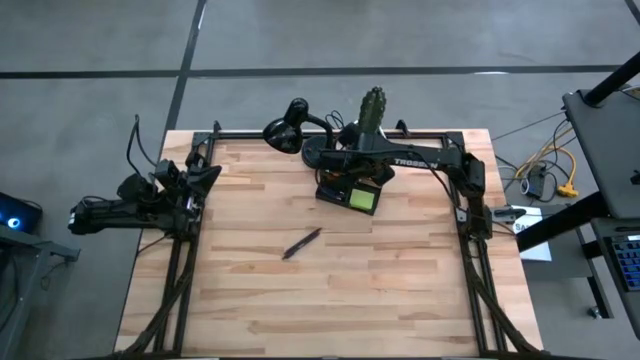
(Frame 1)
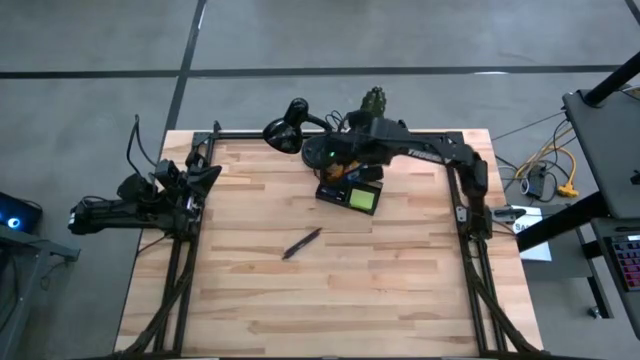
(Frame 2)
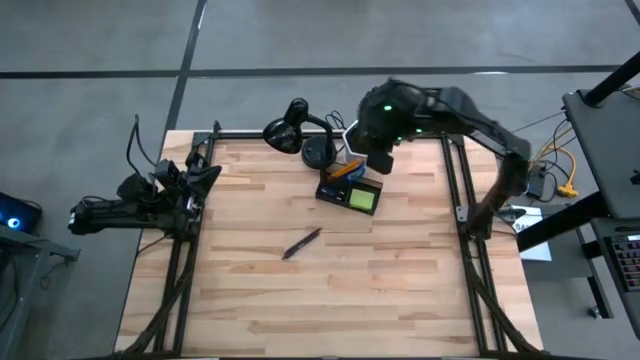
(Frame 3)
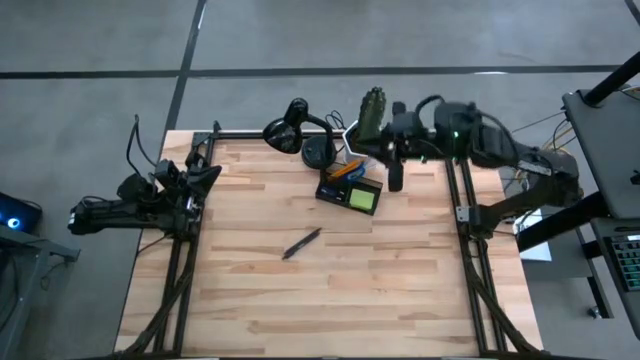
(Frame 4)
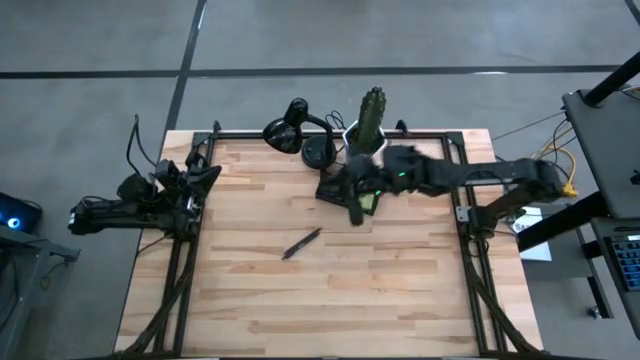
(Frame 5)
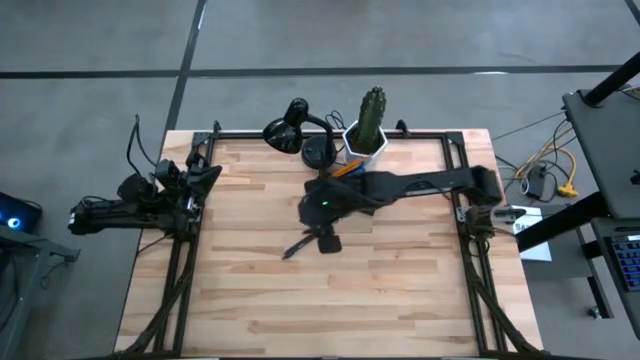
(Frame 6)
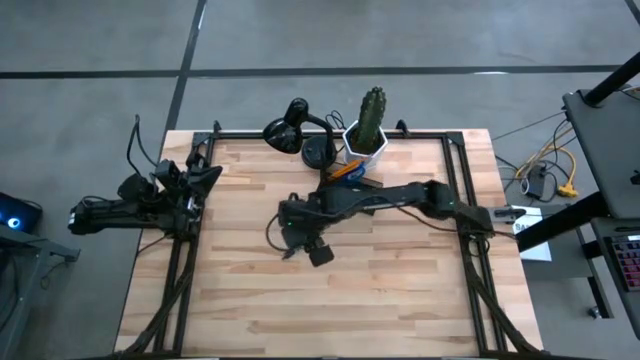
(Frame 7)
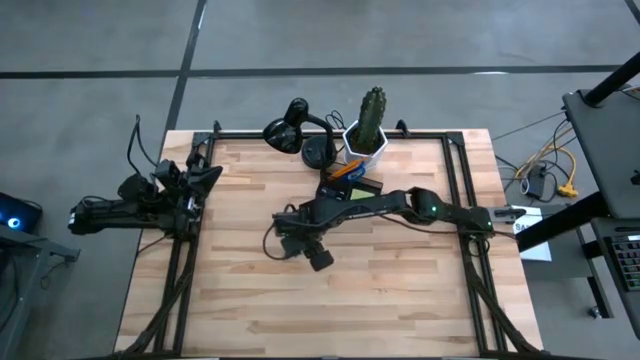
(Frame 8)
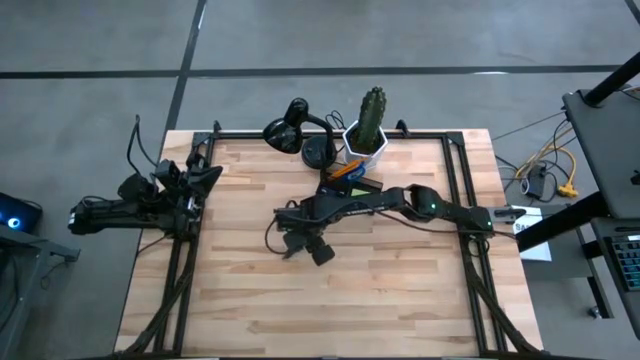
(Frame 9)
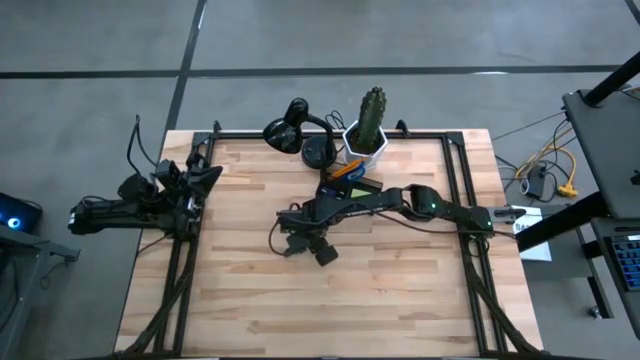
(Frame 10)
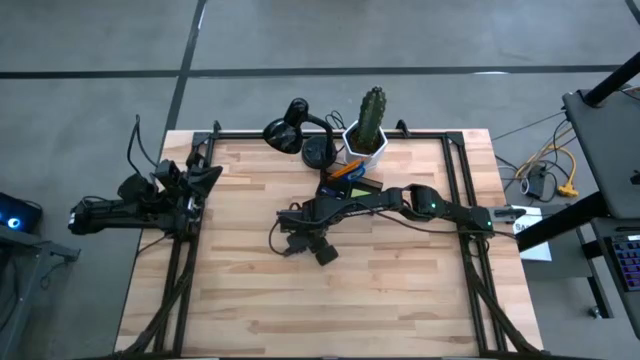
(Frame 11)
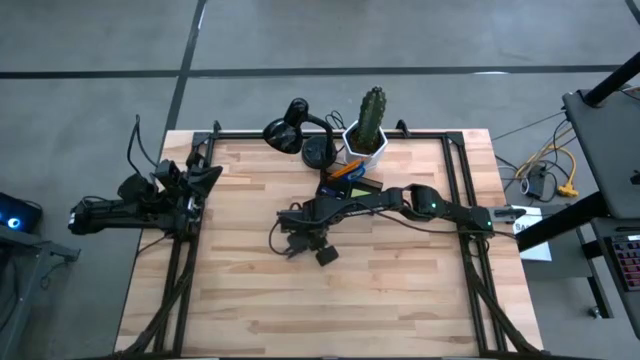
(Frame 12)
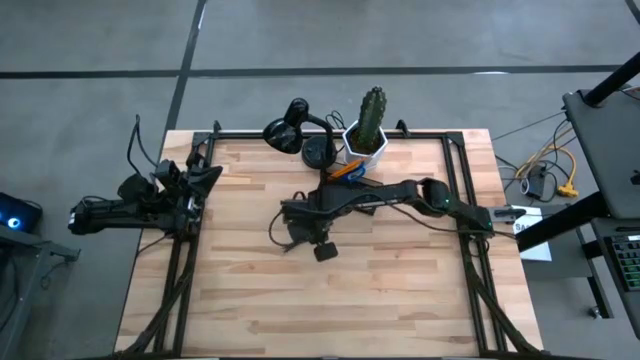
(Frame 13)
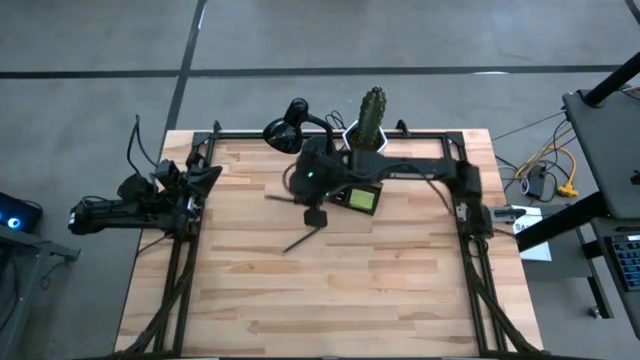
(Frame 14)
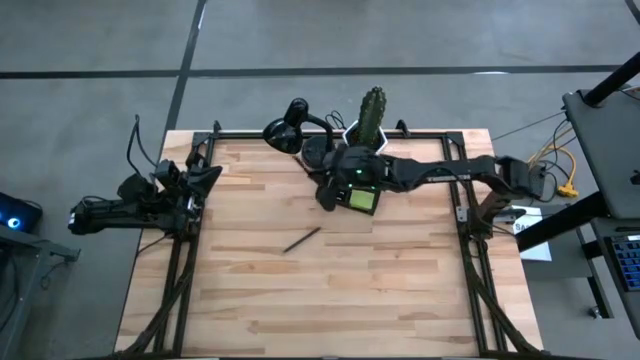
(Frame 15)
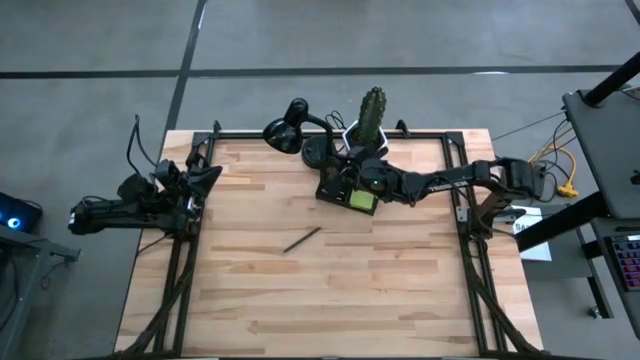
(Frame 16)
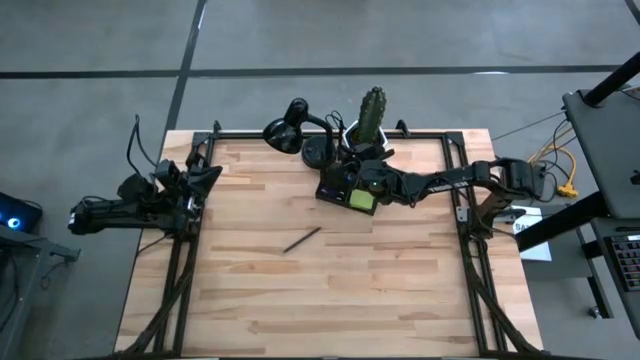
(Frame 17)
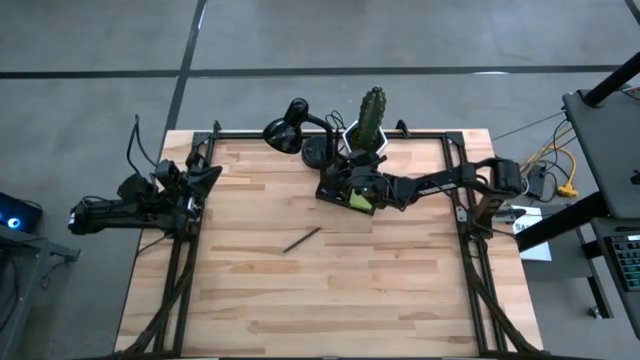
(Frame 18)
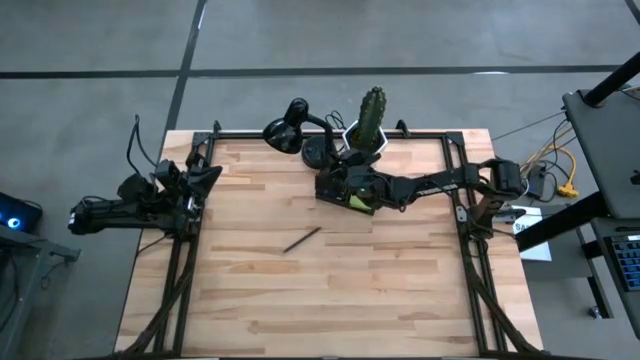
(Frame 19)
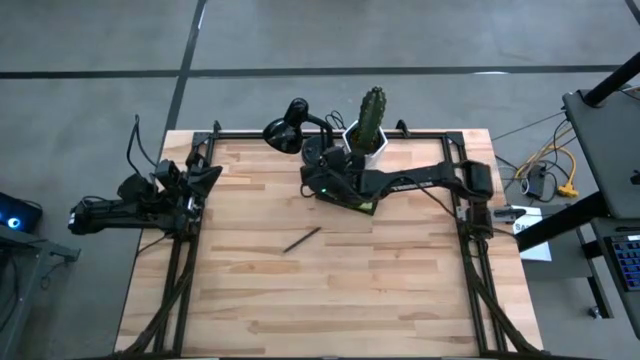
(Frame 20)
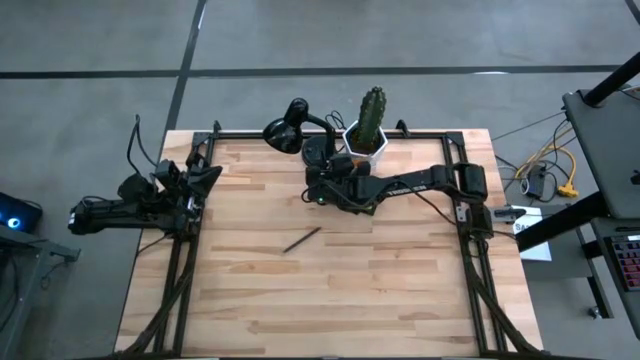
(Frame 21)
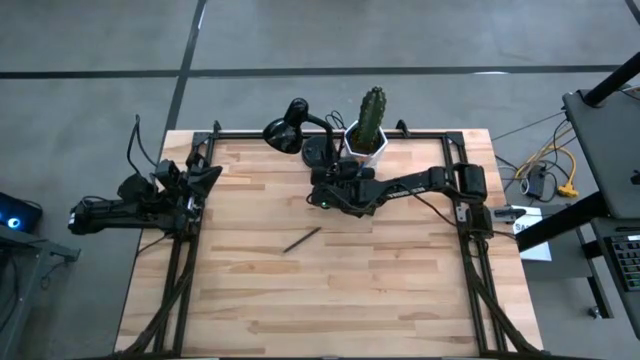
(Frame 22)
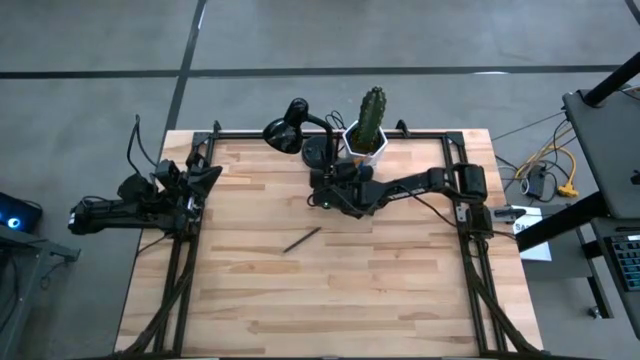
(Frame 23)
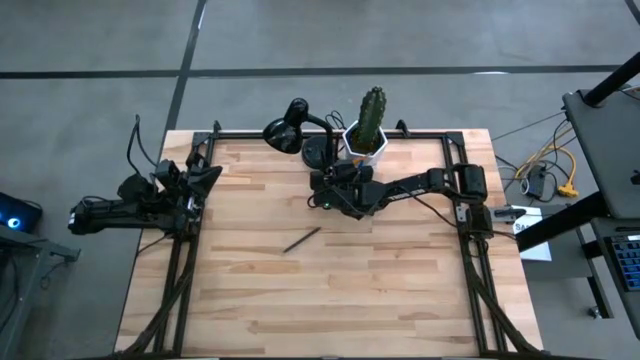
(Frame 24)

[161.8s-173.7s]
Task: Pick and place office supplies into organizer
Put the bottom black pen into the black desk organizer

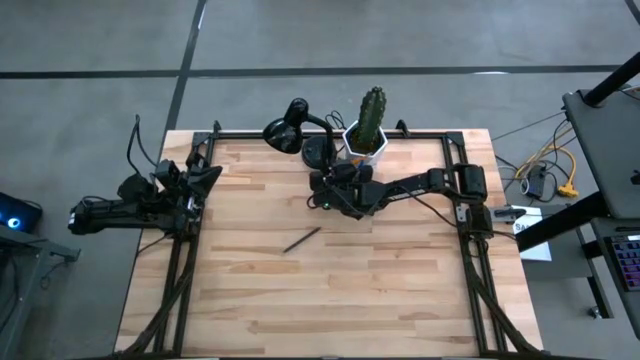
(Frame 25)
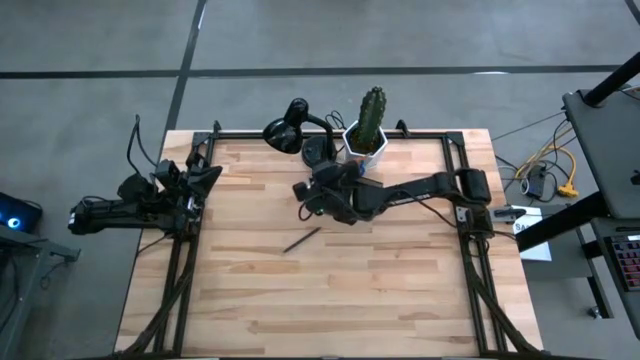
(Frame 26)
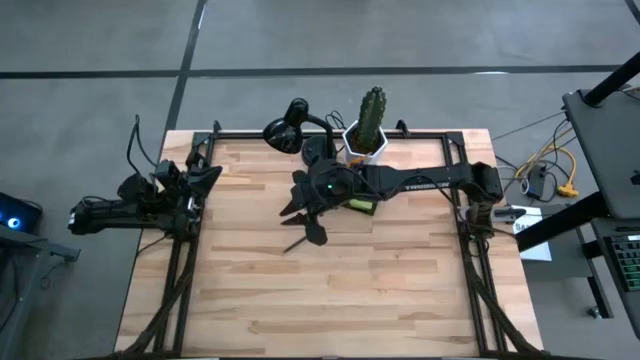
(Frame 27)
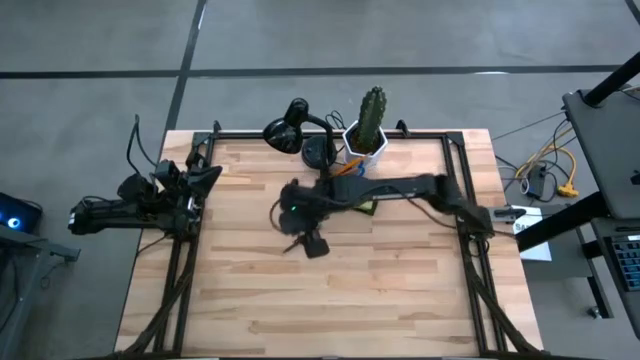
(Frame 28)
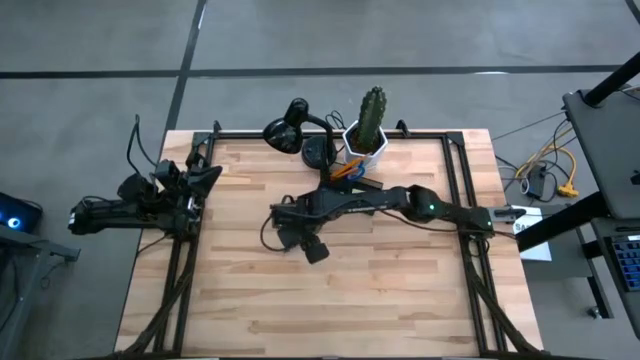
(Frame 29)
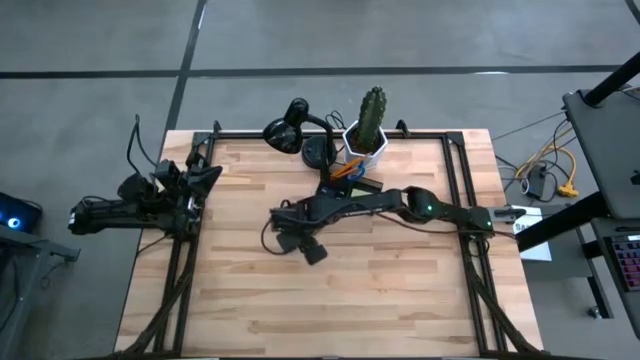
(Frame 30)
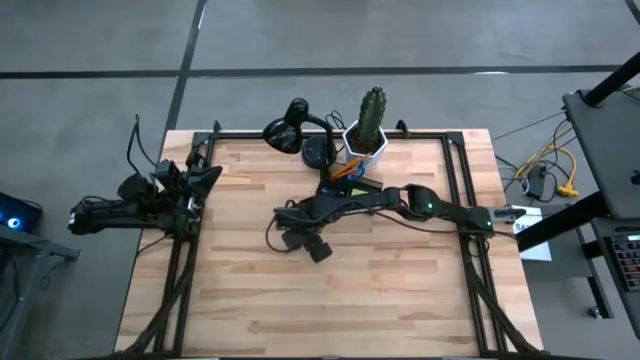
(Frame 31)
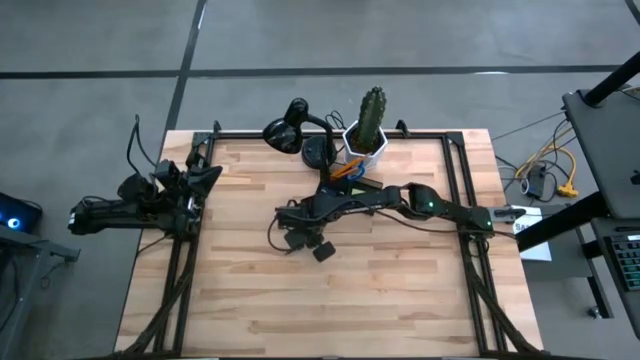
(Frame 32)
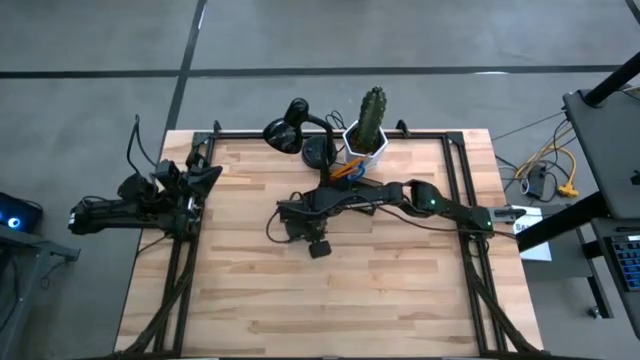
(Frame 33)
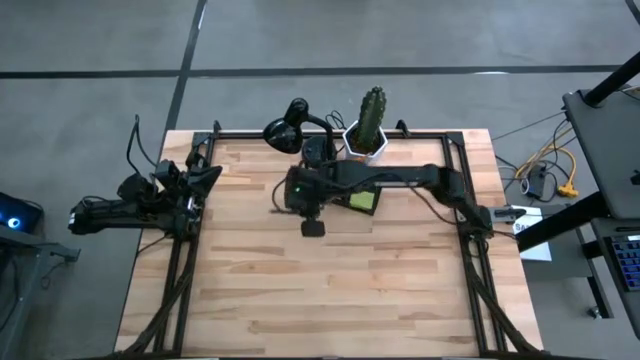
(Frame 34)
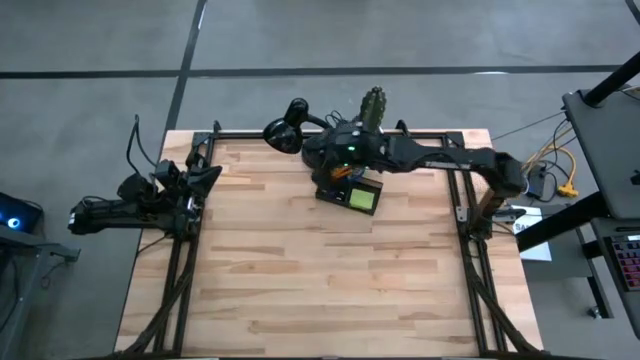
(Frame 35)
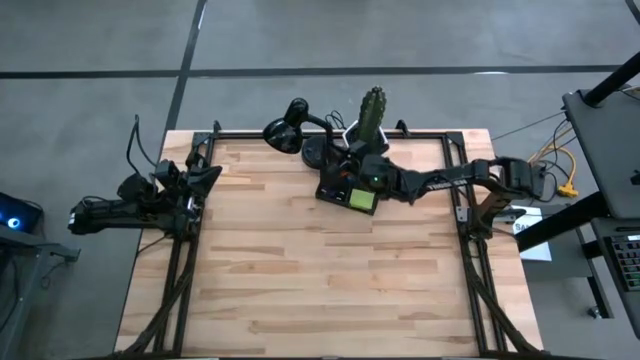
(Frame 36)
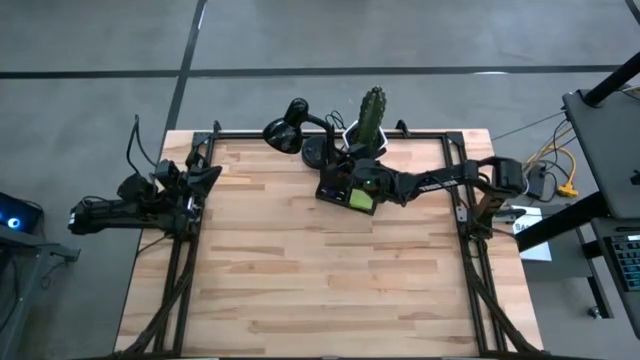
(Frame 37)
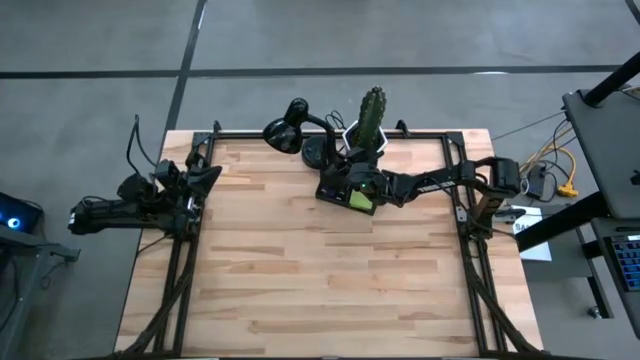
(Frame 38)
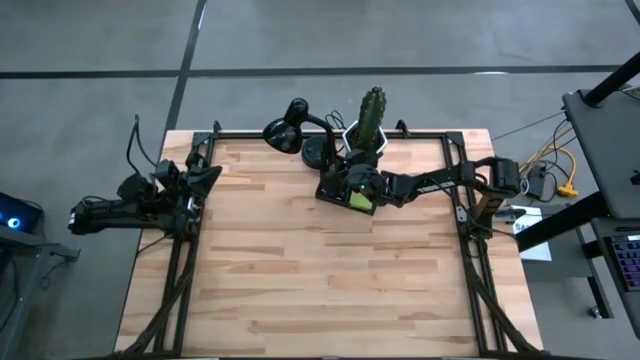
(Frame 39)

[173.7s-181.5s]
Put the black pen into the black desk organizer

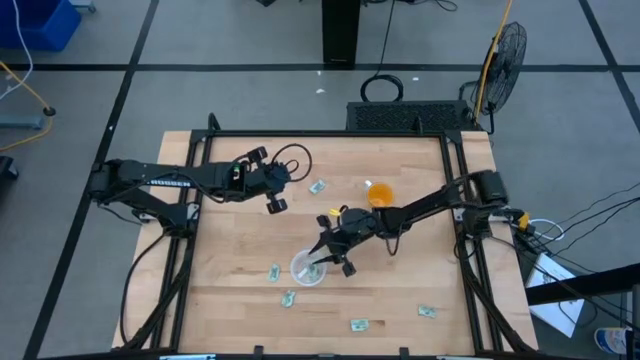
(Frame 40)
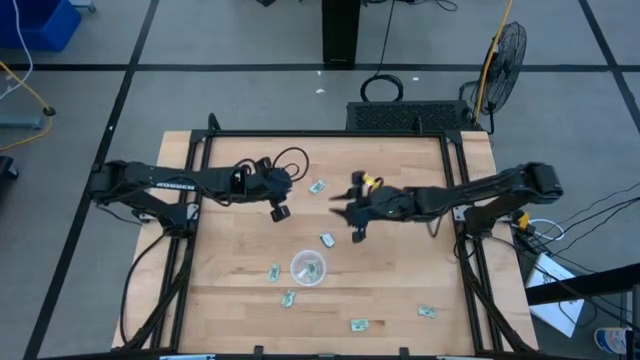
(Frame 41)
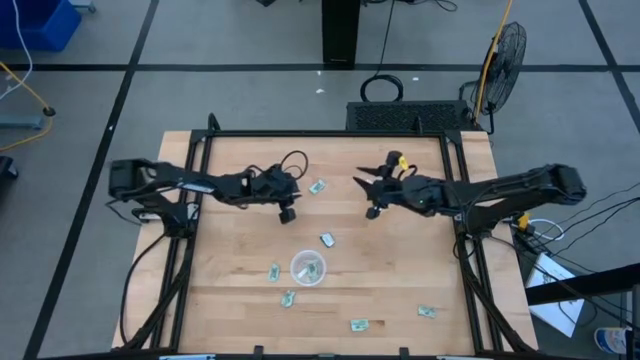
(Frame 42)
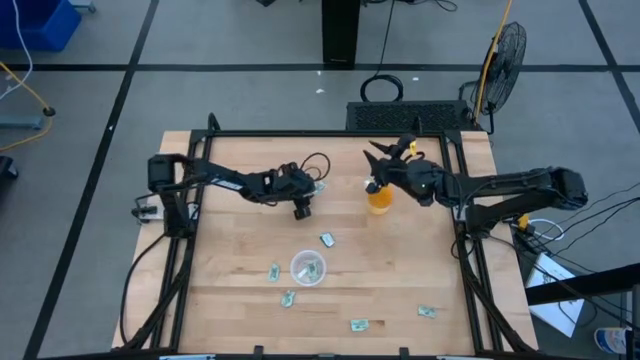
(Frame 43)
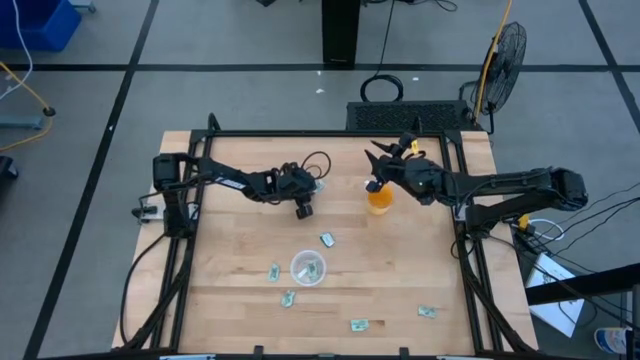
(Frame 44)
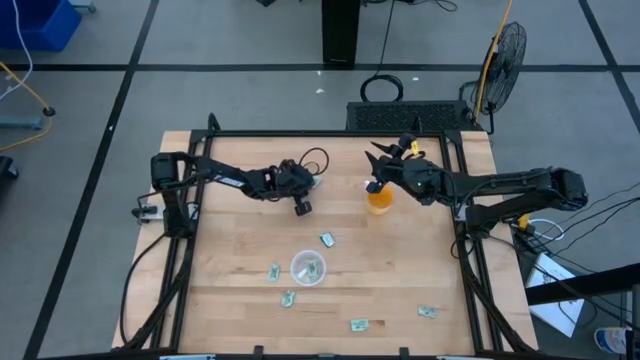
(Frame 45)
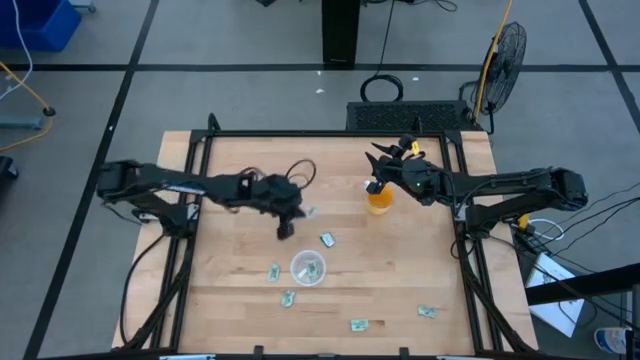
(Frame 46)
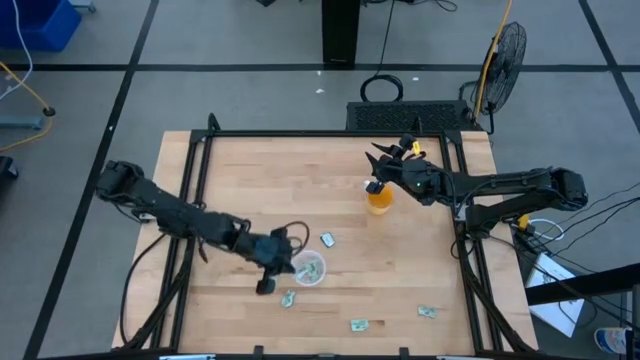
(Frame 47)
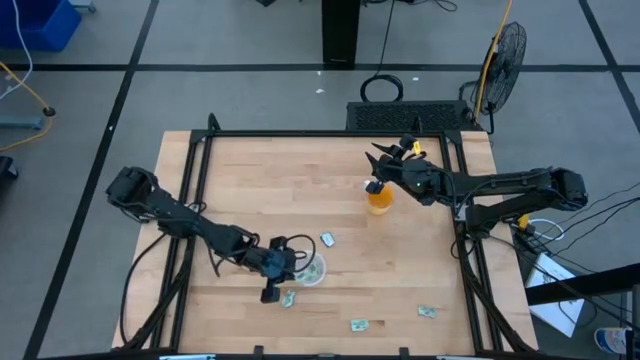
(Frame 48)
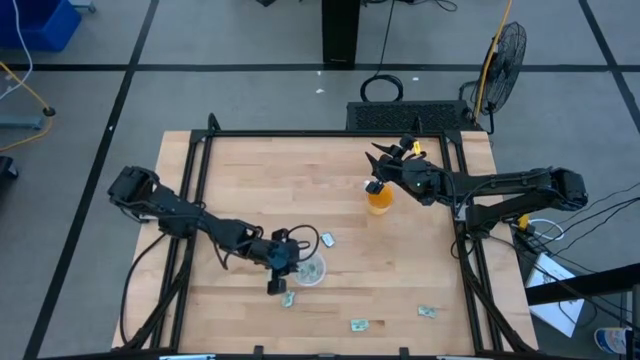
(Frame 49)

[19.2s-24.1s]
Task: Pick and place items into bin
Put the white stevia packet into the transparent bin
